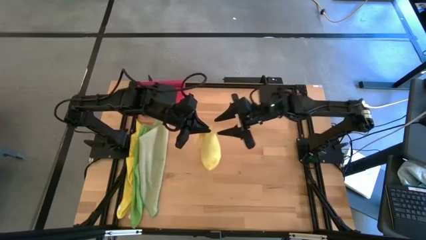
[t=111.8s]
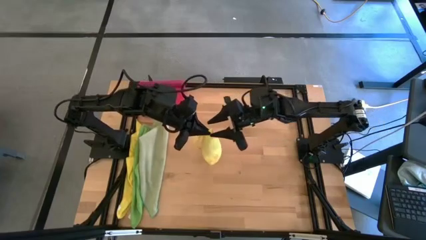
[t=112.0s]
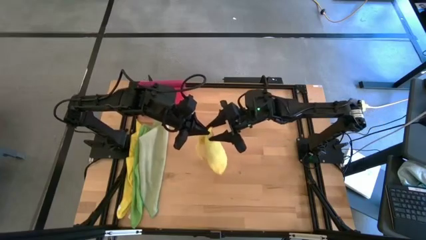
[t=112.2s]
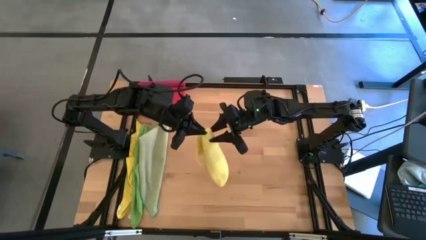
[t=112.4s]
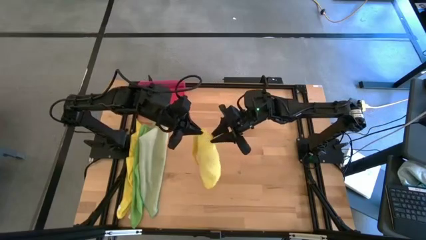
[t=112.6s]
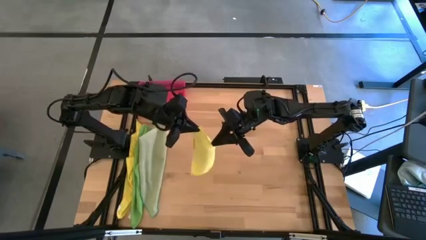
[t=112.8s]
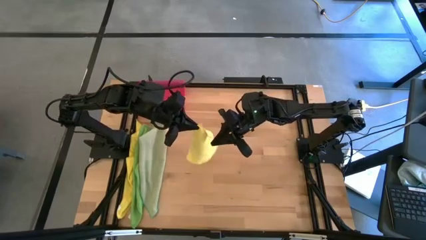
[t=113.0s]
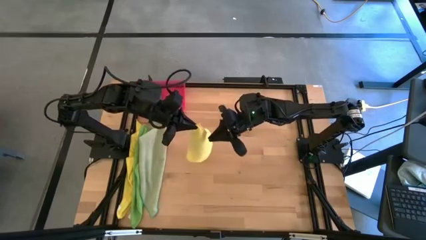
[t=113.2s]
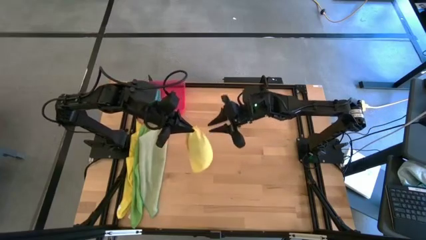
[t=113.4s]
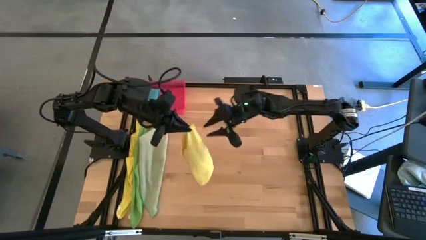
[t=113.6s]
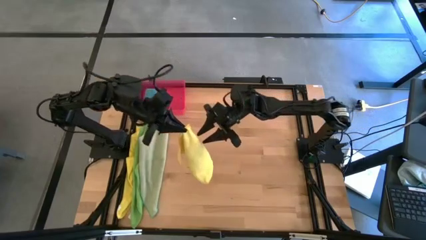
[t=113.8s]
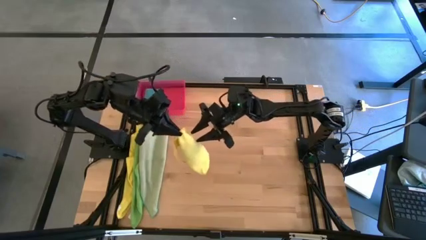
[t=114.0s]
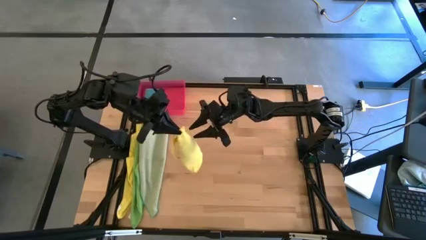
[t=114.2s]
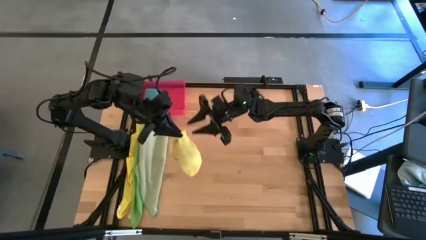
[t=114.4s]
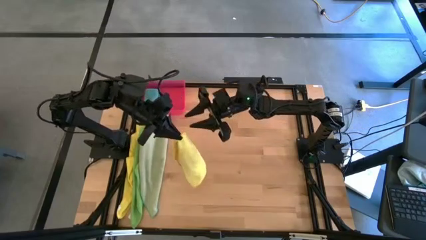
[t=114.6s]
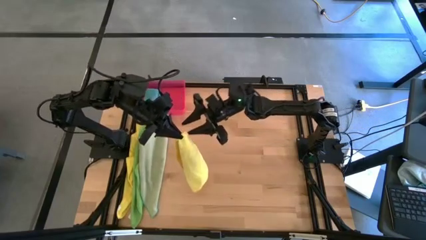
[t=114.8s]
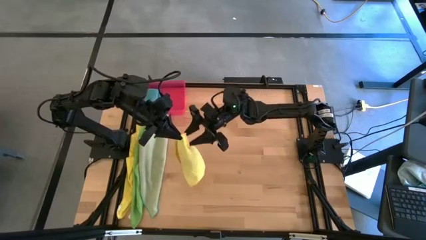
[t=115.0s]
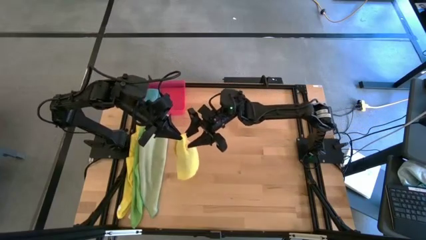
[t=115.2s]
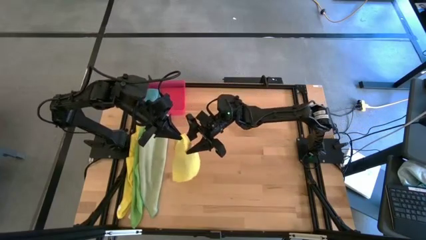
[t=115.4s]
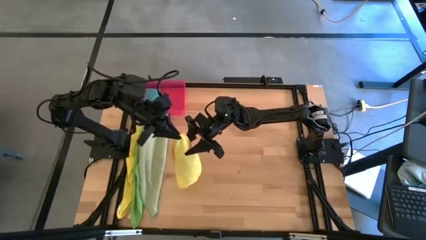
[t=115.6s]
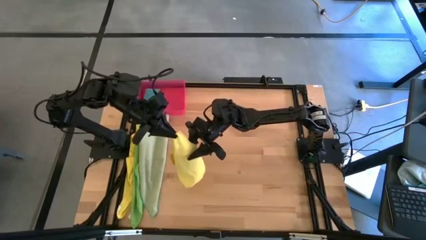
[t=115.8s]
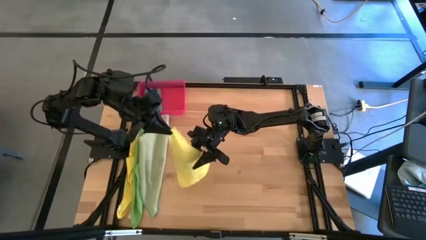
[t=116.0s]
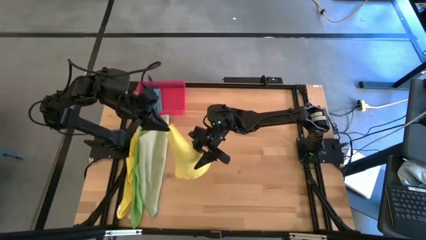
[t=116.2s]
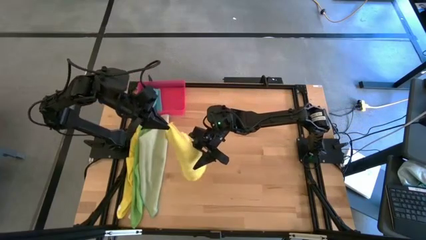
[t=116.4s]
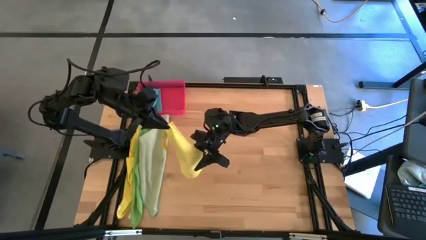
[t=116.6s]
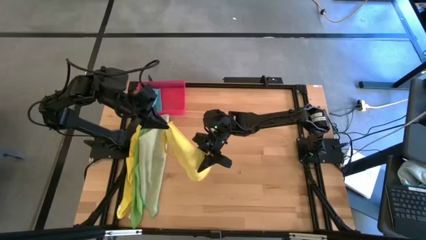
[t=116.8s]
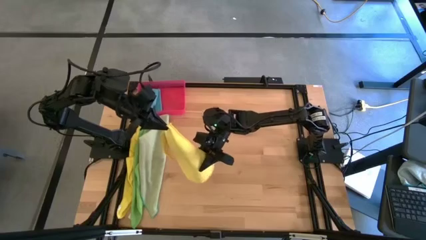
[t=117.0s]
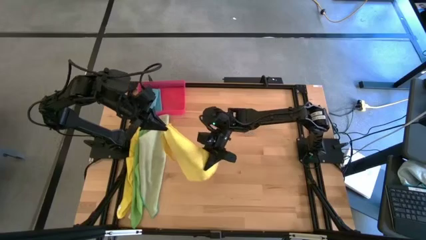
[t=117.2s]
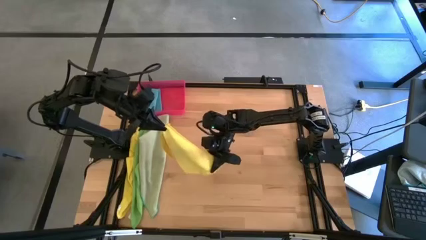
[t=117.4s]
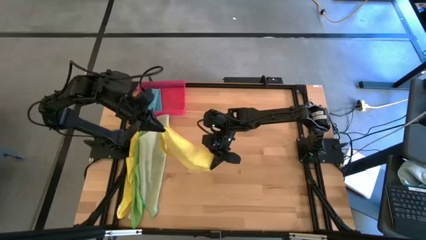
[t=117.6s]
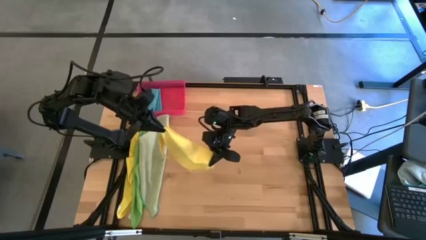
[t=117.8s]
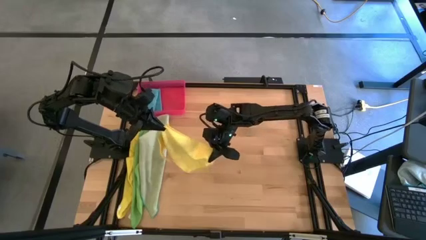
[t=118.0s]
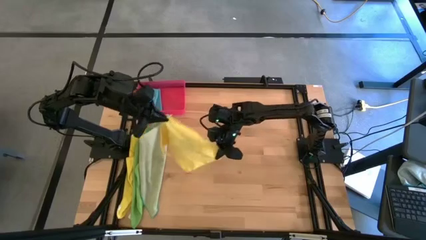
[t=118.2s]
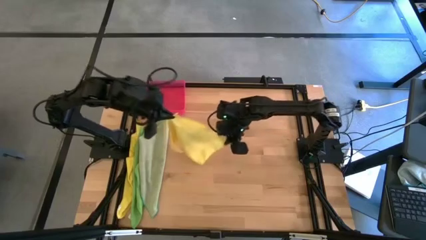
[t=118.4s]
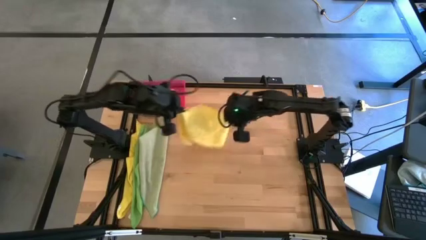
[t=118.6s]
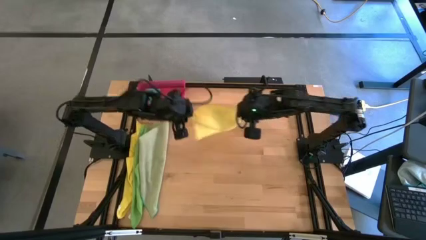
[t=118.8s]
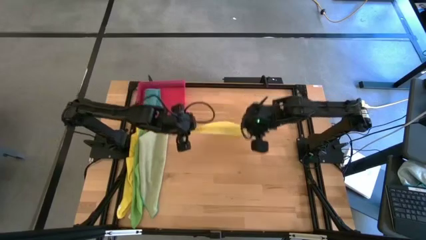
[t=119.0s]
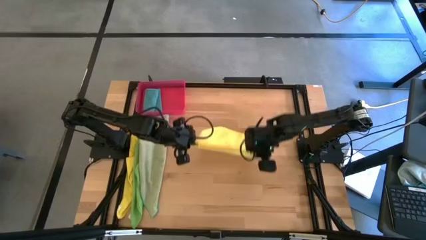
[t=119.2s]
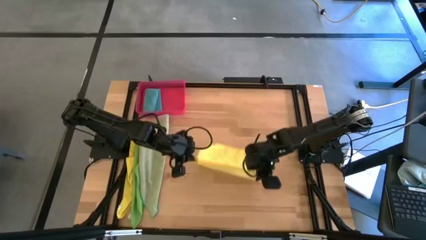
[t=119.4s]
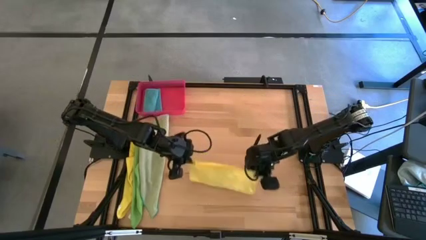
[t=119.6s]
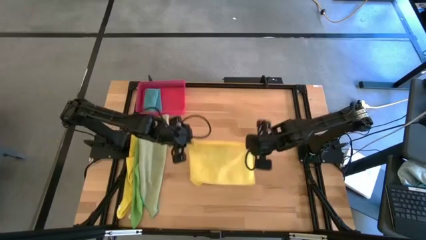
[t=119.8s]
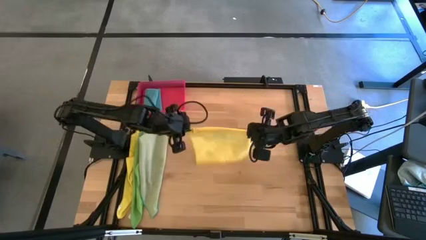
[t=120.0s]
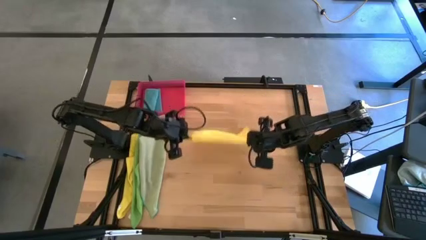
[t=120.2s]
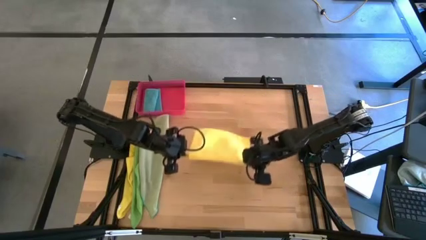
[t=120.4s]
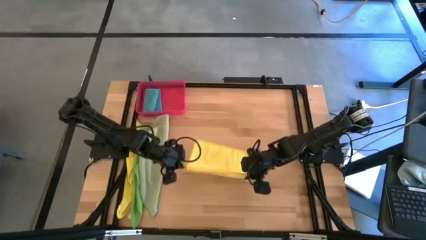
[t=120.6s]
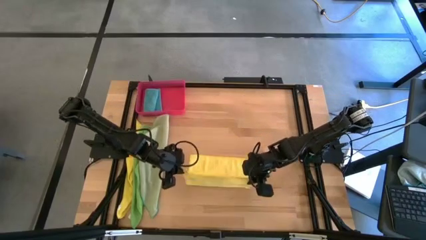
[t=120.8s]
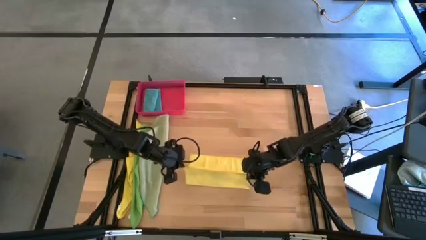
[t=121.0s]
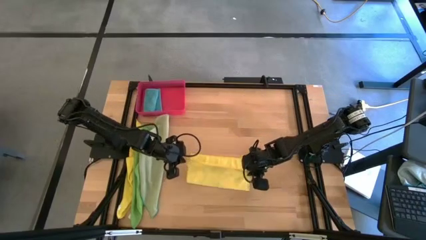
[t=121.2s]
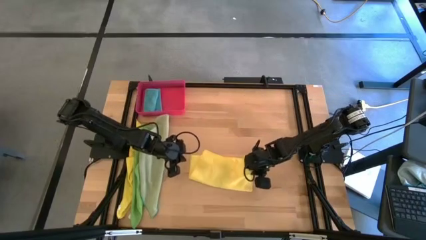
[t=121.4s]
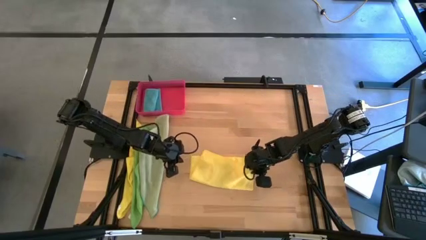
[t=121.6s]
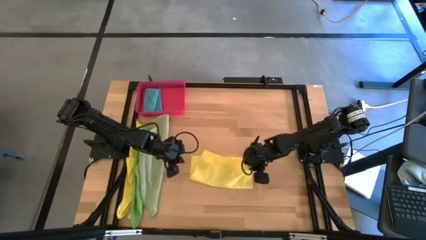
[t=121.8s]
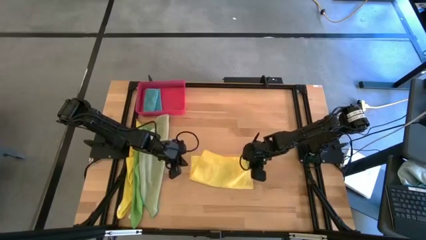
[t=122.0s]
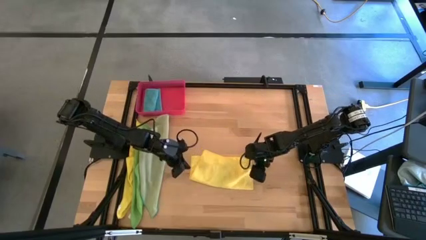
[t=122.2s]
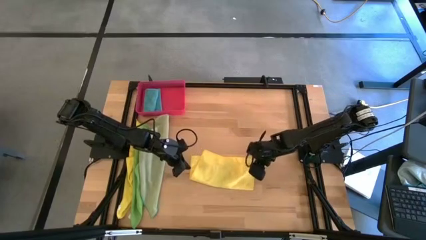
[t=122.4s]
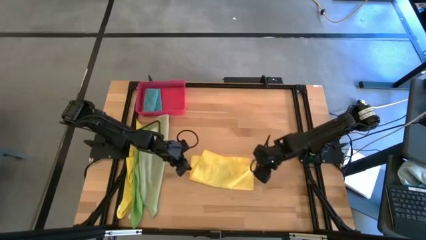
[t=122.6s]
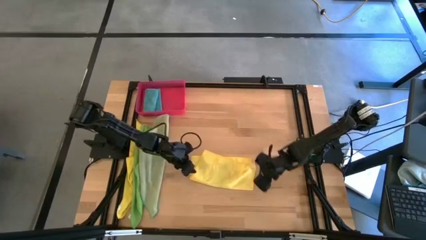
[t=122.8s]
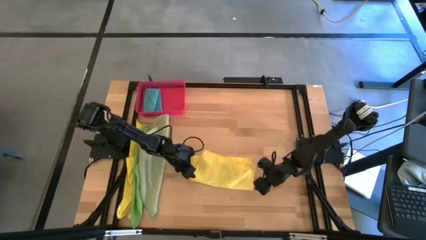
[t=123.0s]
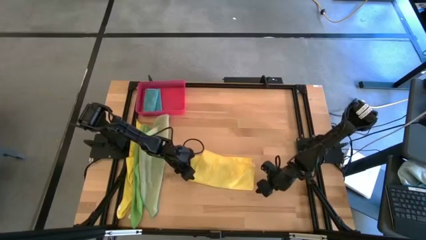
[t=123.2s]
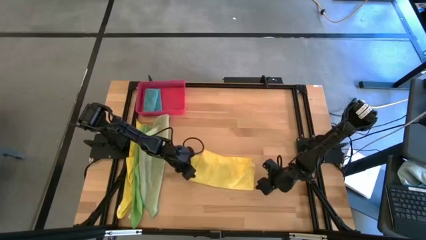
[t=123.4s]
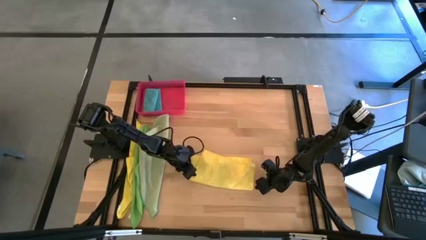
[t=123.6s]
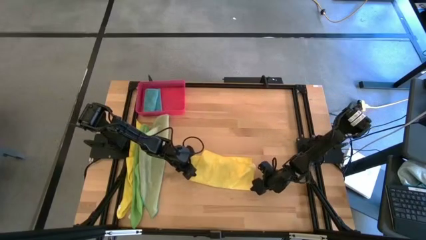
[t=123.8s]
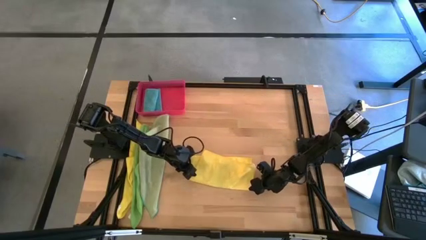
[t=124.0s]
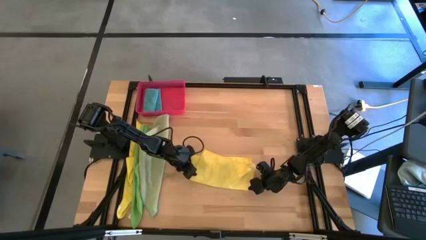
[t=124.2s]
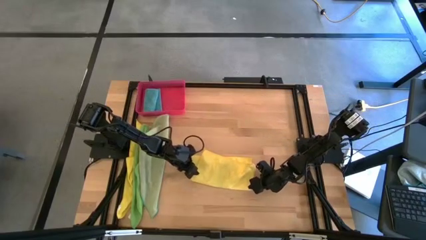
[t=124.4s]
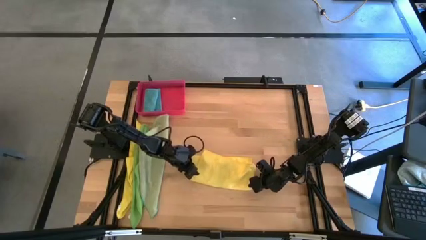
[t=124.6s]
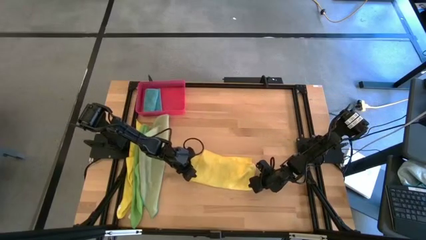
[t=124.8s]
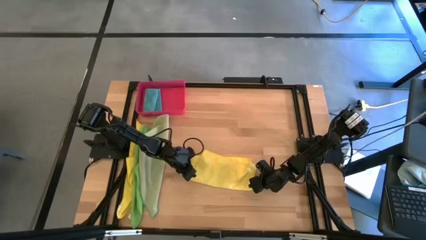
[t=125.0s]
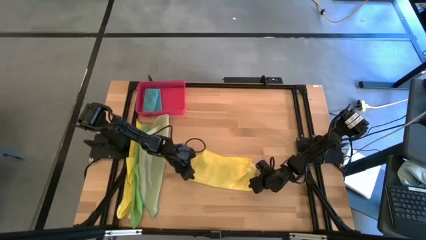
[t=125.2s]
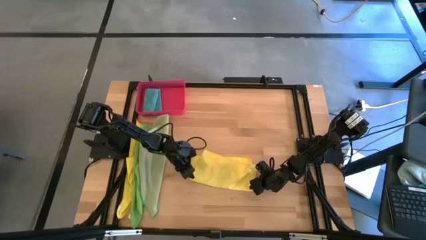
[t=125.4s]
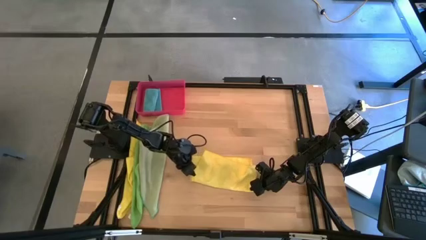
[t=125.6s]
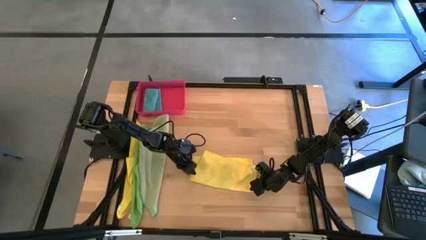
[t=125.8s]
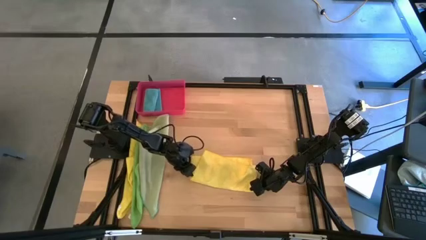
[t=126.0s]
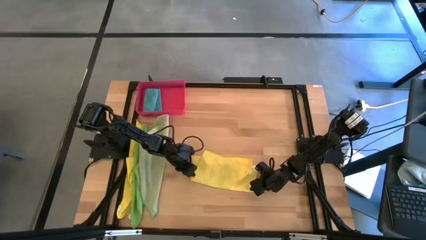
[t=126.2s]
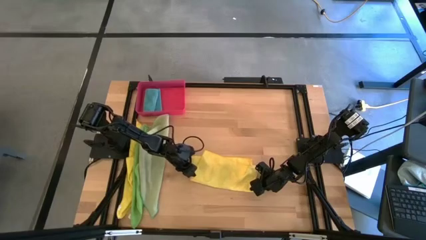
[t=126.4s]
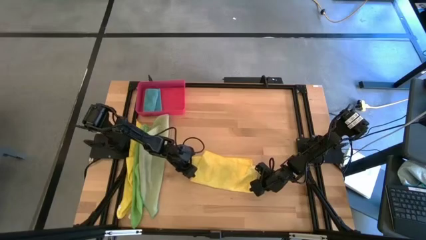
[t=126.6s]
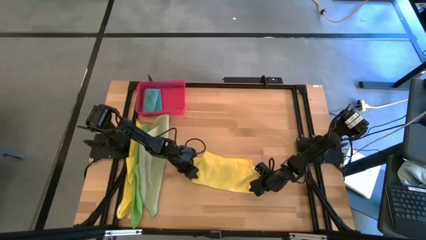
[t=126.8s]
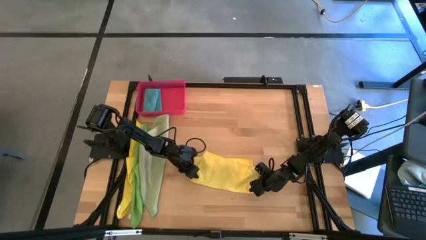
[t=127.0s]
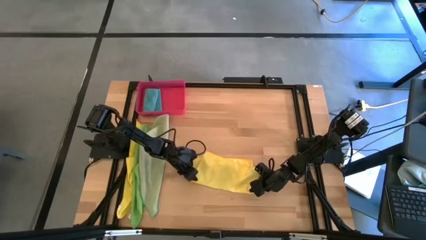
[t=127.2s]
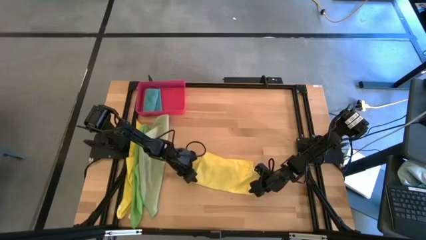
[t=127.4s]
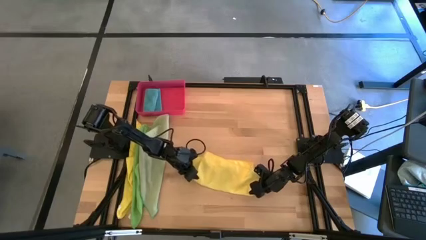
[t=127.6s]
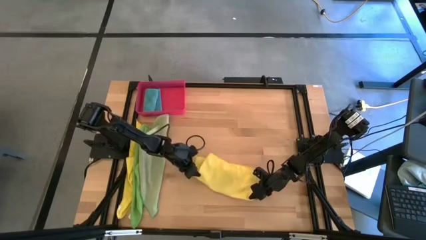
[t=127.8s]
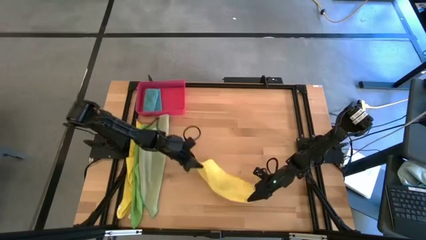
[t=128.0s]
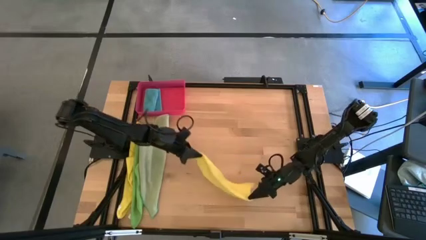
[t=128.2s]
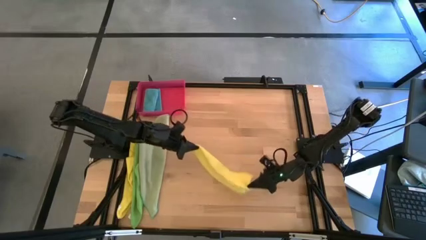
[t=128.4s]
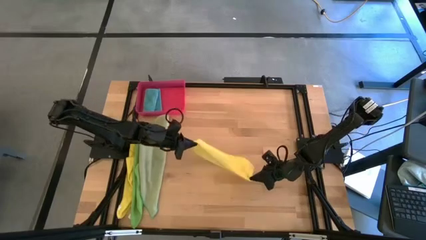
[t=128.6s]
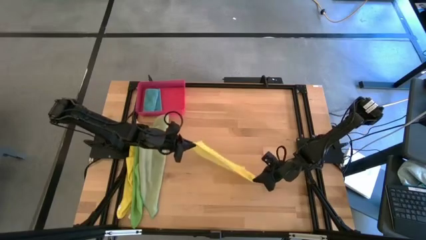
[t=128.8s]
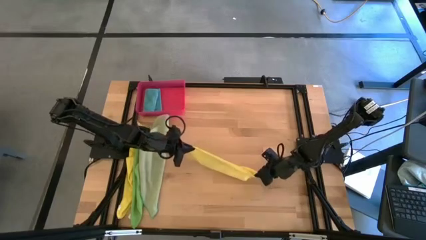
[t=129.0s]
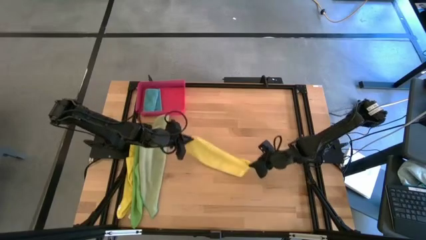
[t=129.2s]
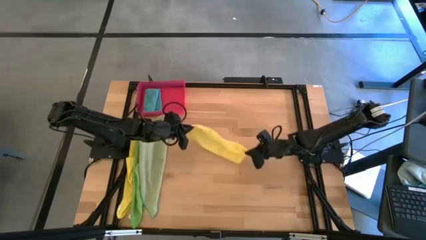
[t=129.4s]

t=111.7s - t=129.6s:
Task: Fold microfiber towels
Fold the right yellow microfiber towel on the table
